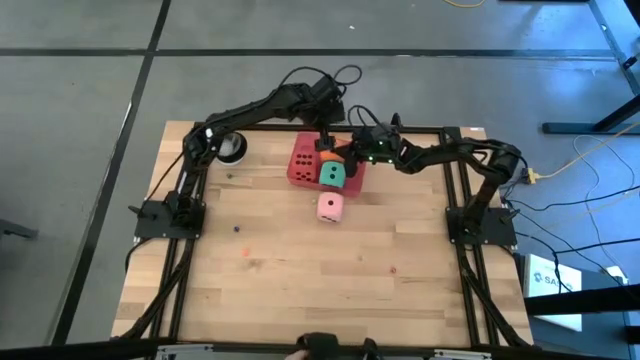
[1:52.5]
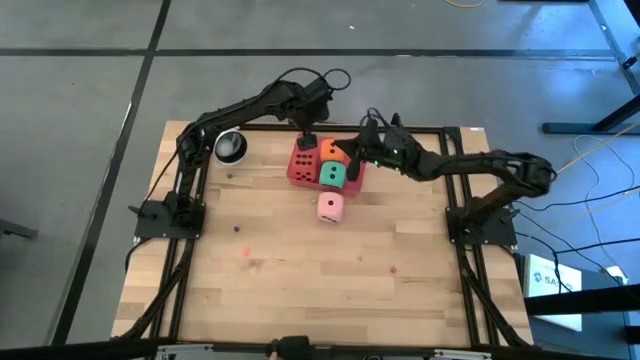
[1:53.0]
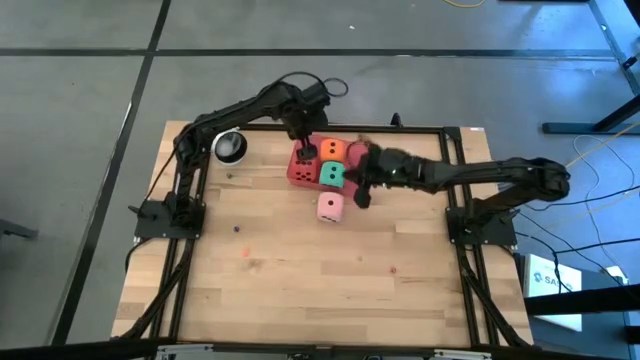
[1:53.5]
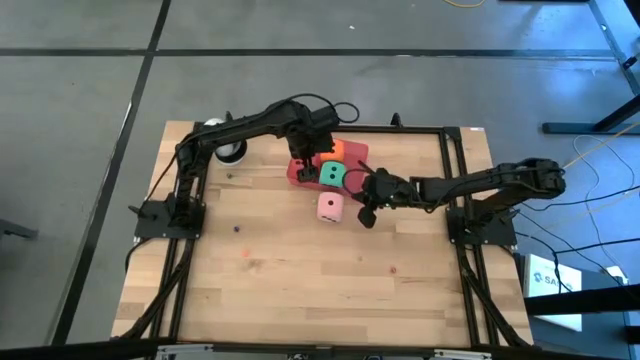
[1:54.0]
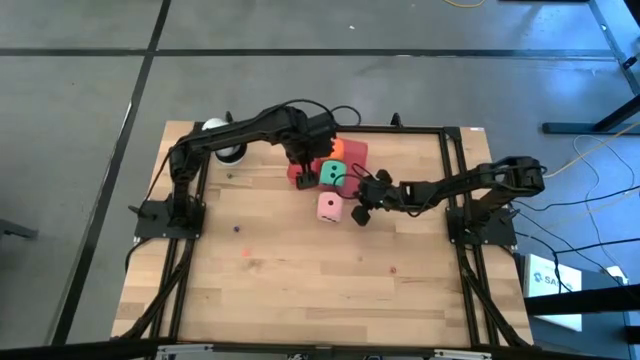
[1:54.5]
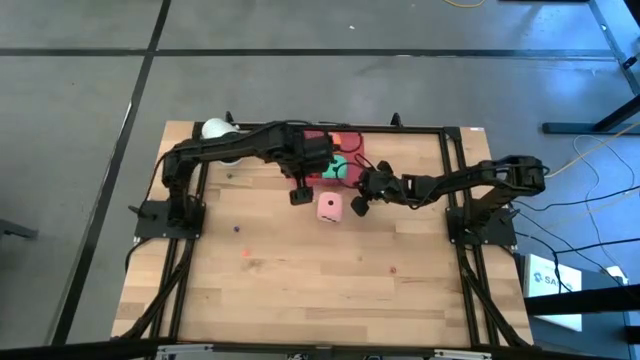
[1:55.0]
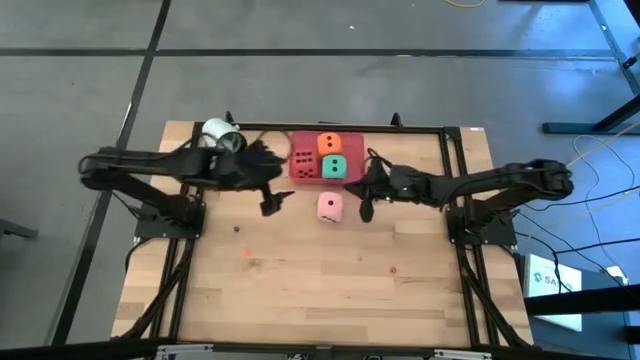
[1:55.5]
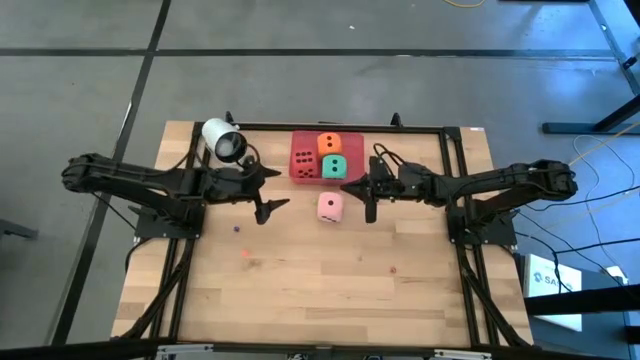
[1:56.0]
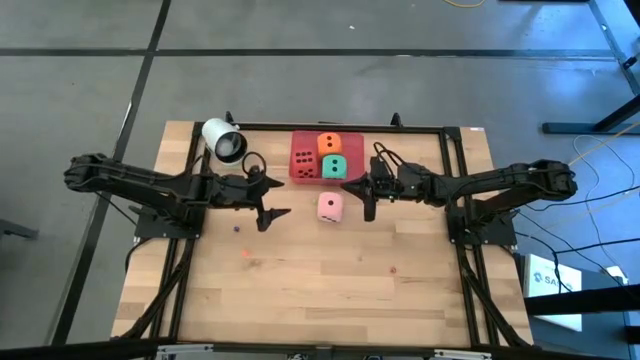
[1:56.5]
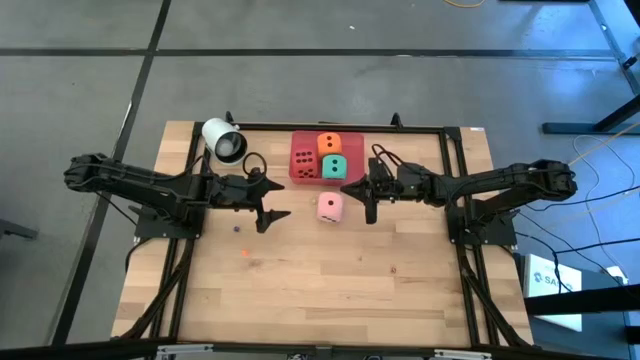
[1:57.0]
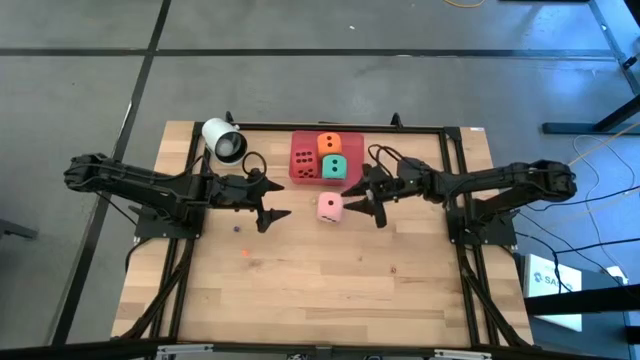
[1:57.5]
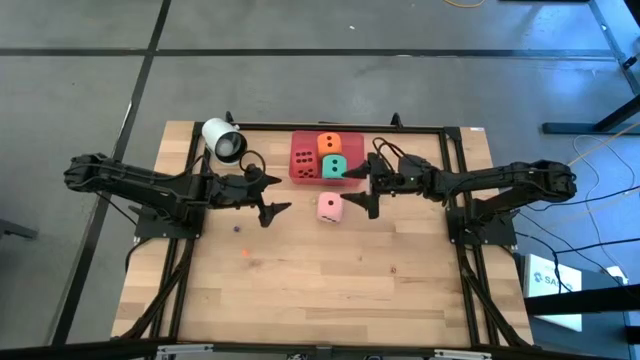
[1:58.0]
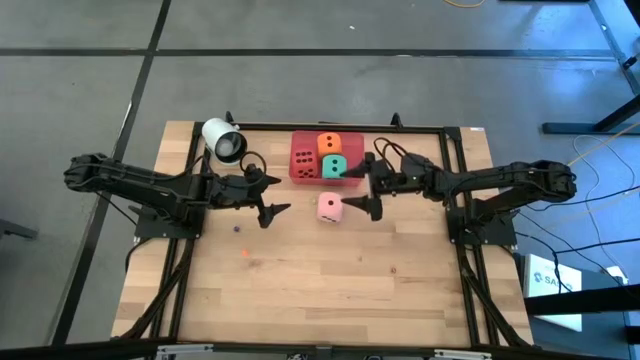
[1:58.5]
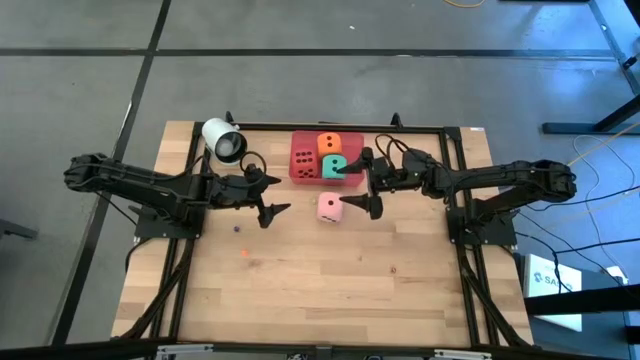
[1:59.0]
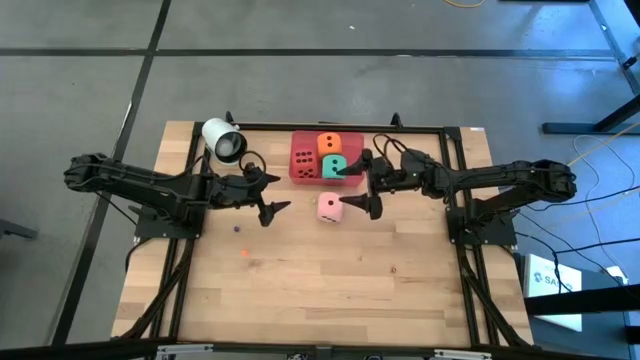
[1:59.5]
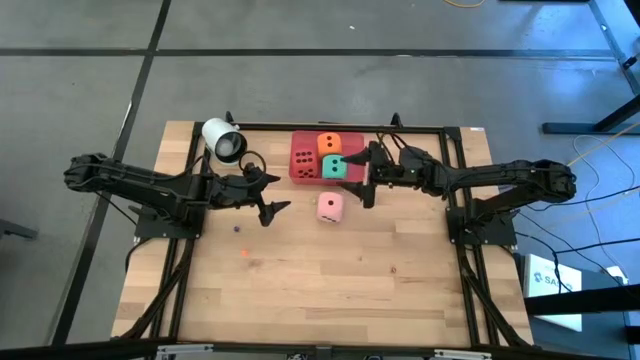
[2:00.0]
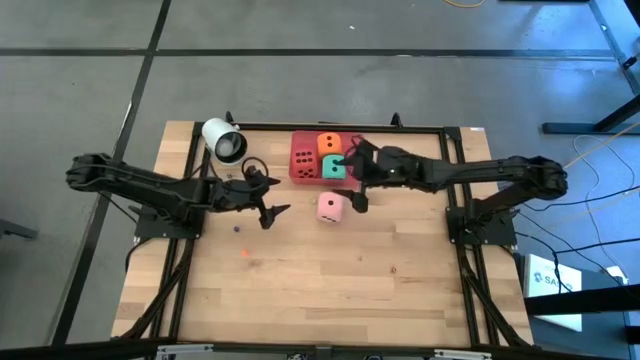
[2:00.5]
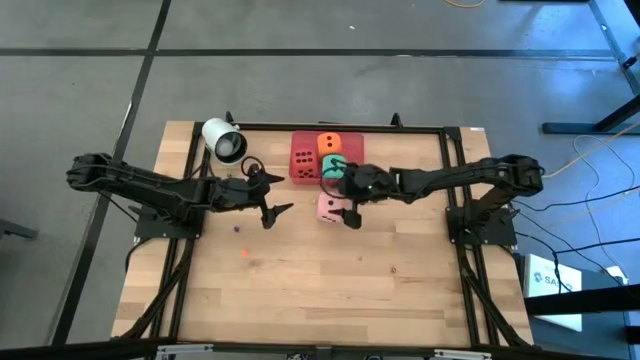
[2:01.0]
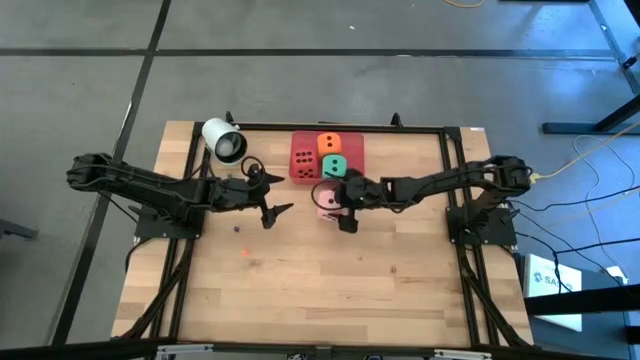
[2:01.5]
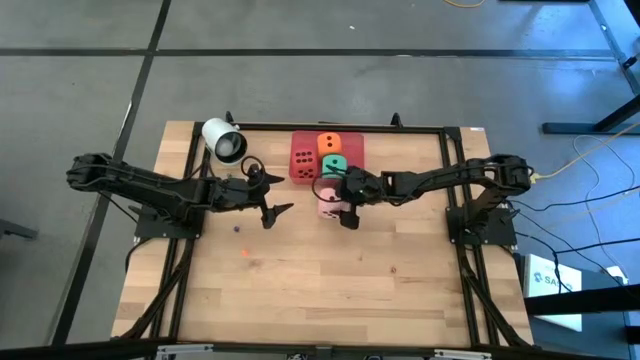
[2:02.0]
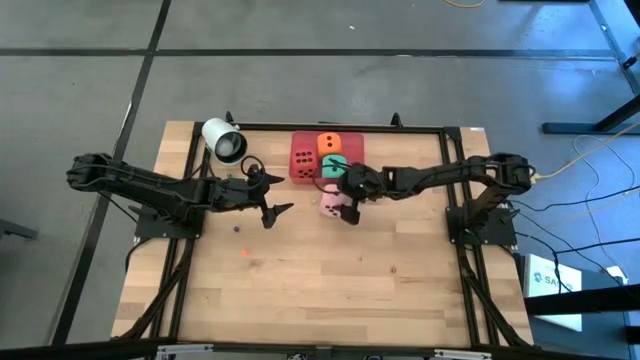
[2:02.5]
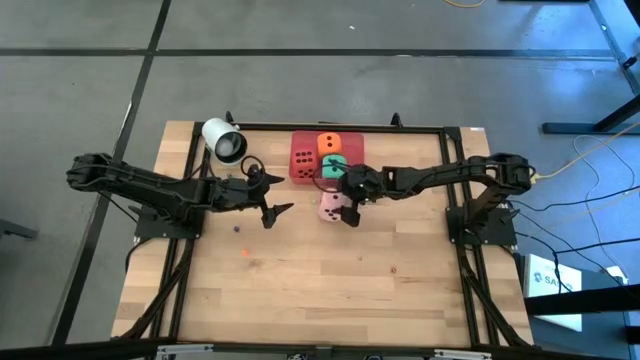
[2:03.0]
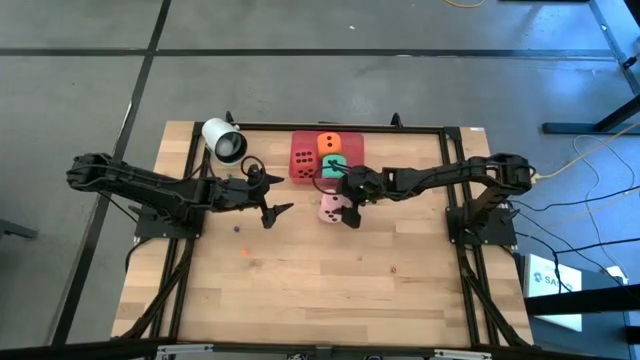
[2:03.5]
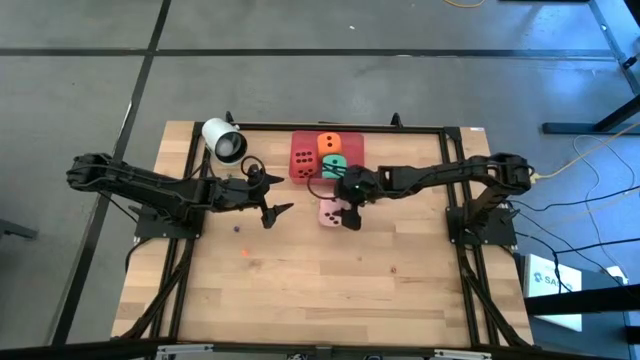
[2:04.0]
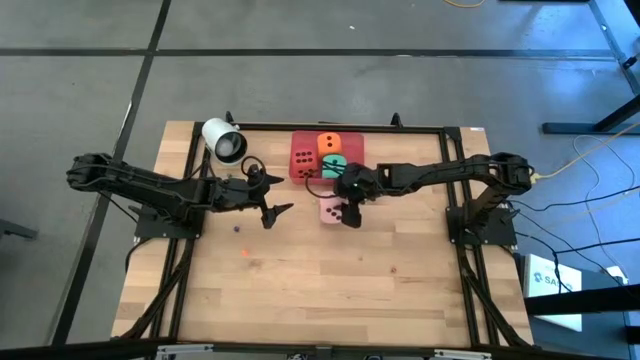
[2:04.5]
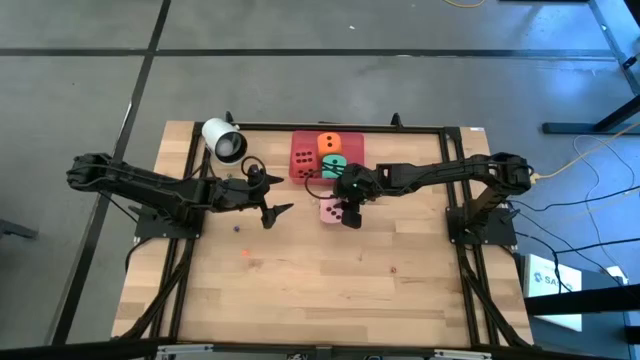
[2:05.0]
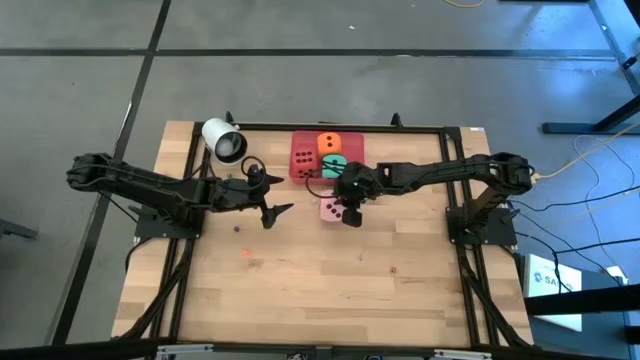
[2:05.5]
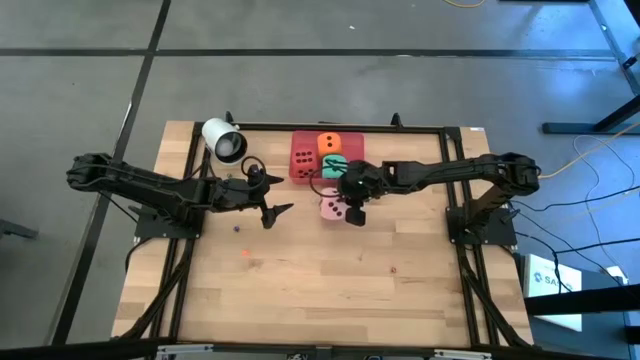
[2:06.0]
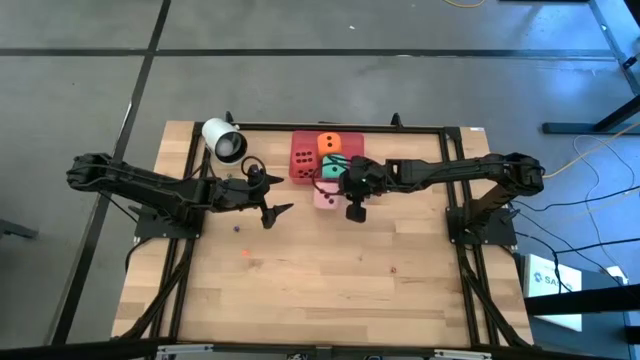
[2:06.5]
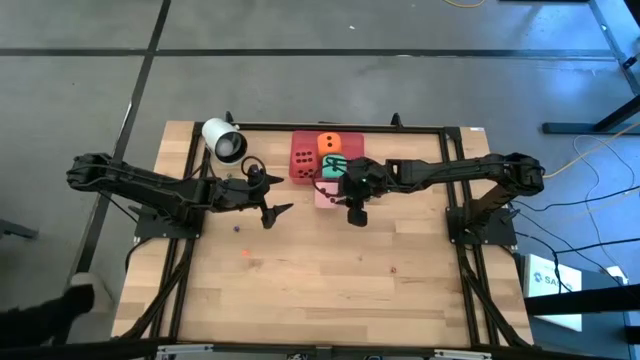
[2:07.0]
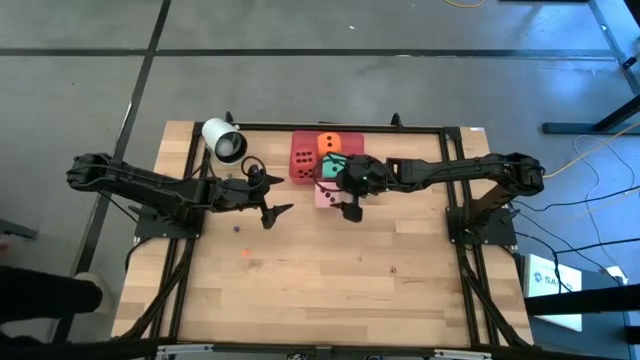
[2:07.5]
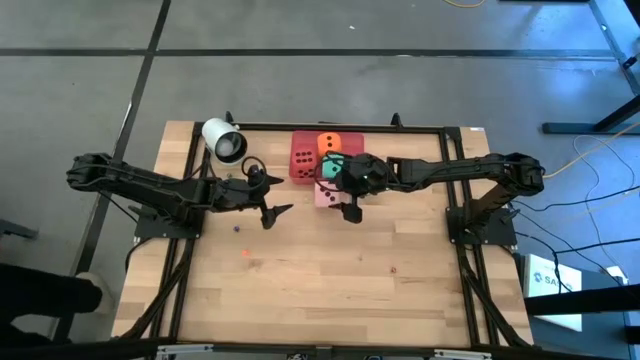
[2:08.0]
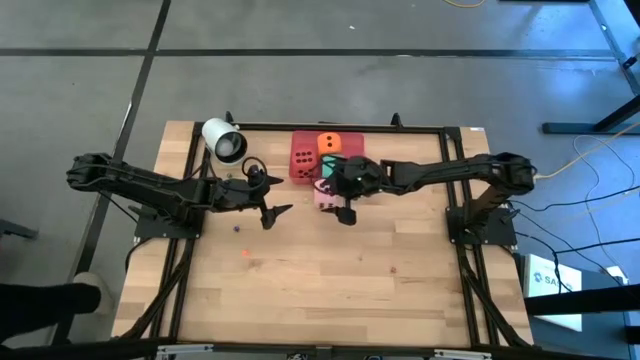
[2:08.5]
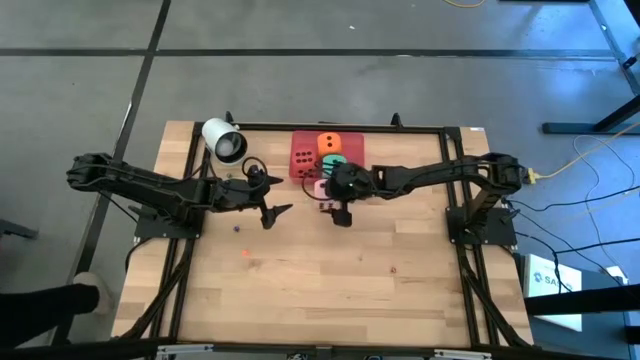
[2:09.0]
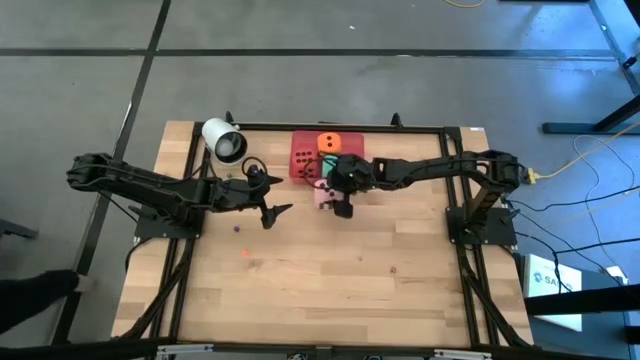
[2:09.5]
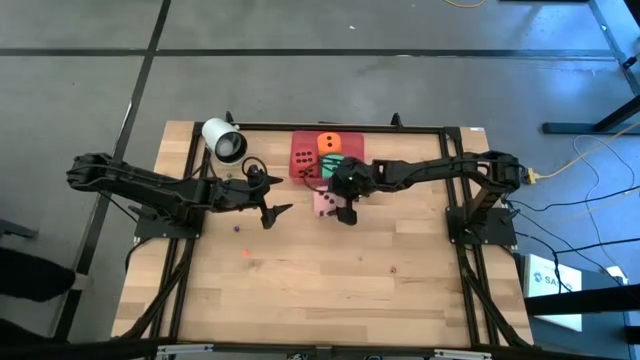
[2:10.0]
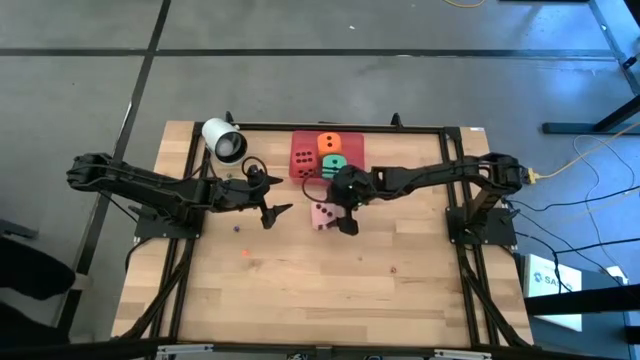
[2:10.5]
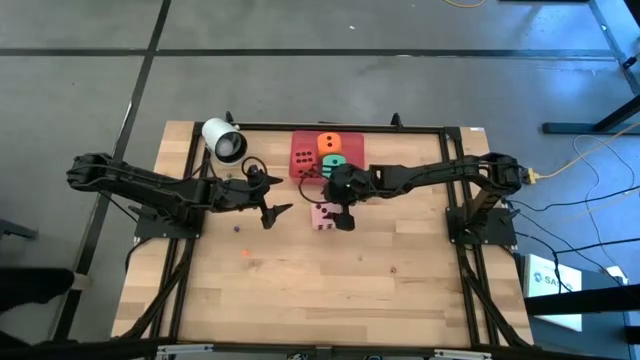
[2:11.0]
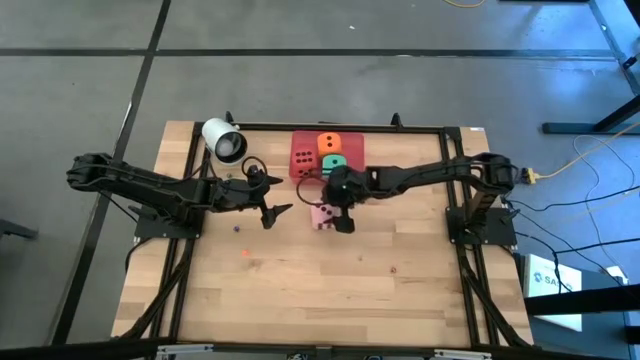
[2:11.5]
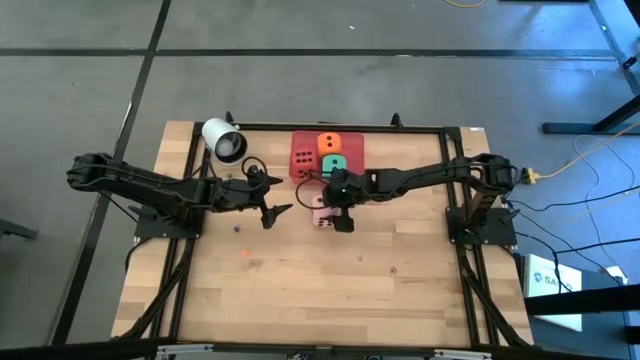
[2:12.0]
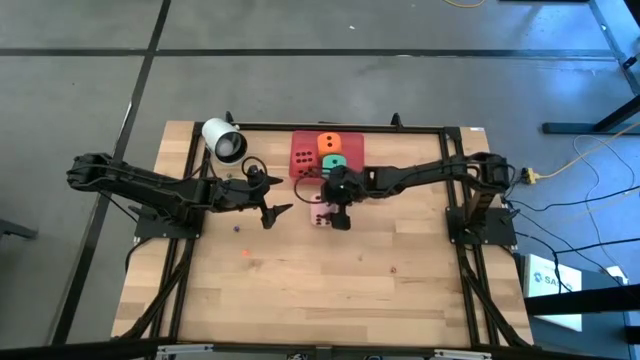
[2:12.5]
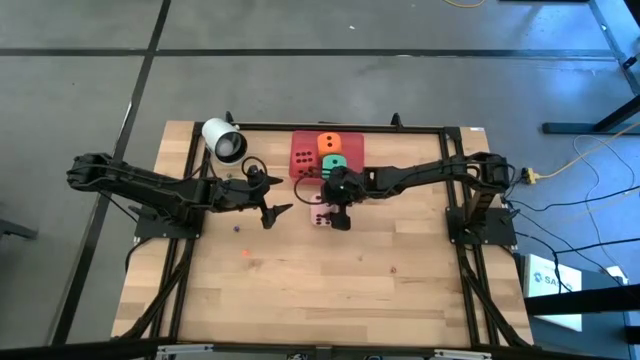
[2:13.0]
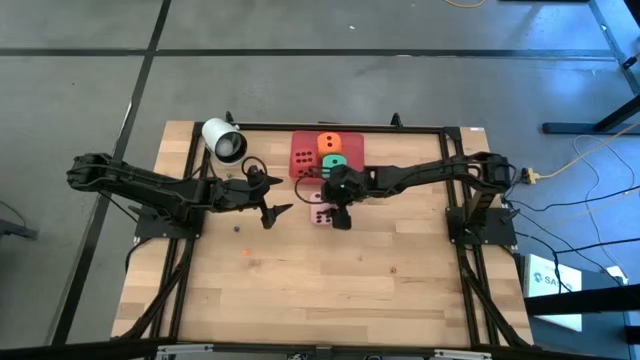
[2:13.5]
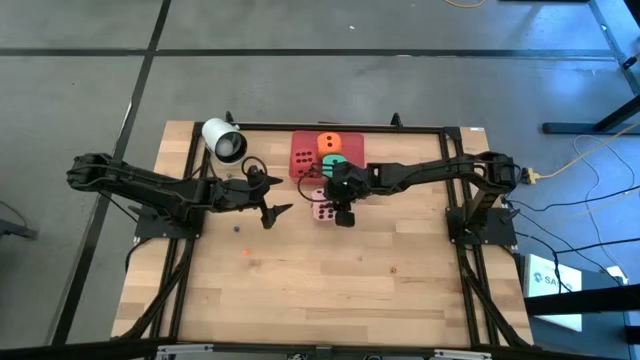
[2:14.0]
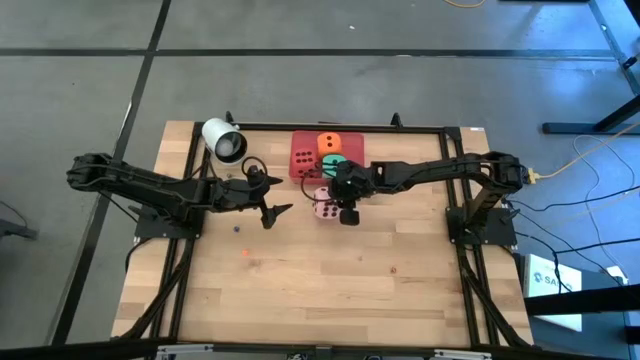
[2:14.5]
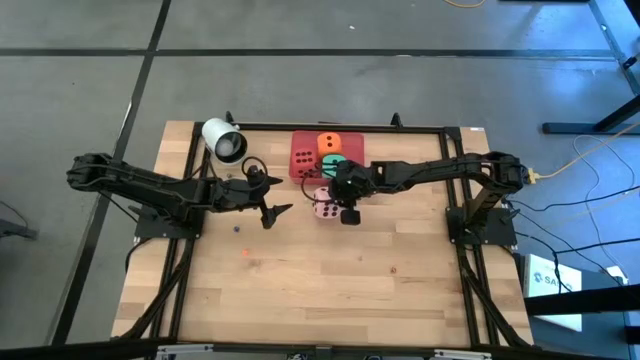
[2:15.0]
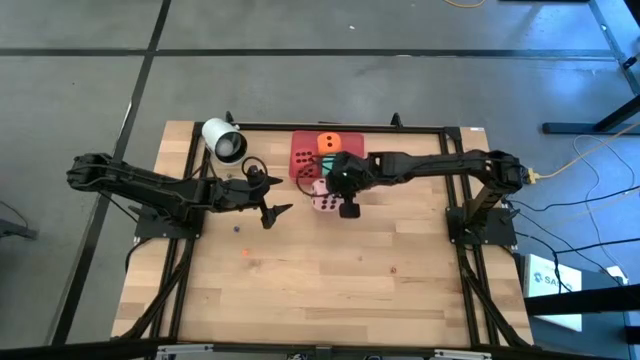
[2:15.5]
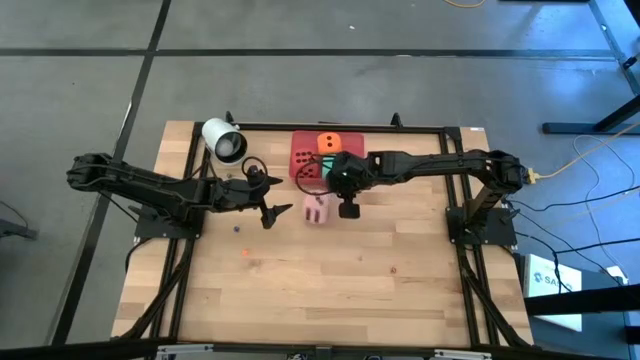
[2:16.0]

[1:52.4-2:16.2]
Task: Pick & Place Dice
Put the pink die into the pink bin
